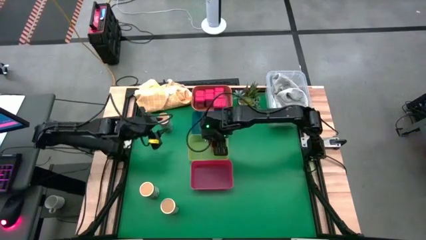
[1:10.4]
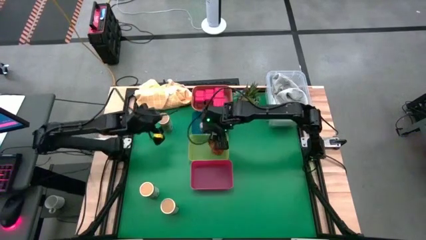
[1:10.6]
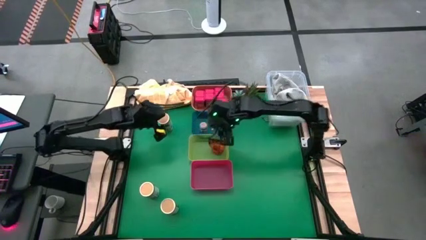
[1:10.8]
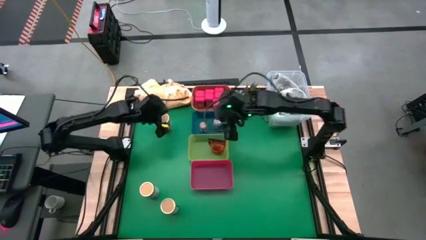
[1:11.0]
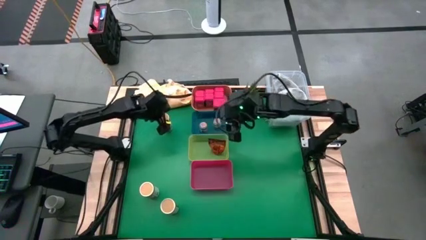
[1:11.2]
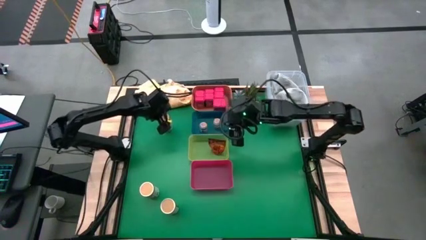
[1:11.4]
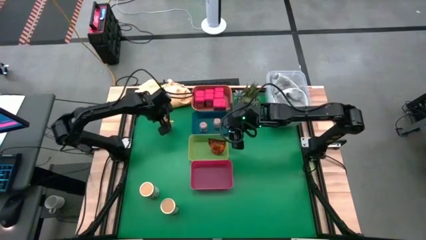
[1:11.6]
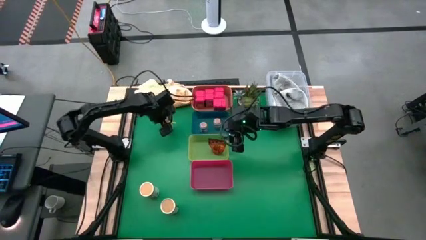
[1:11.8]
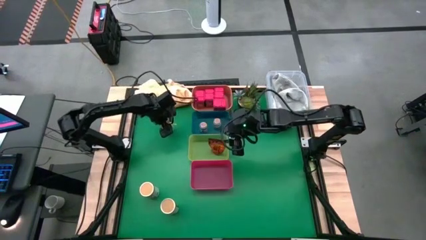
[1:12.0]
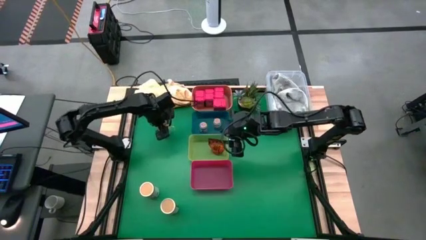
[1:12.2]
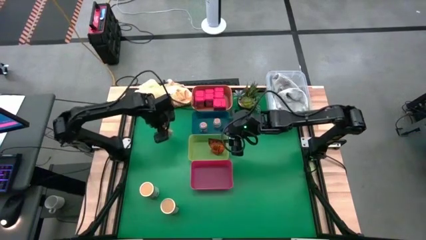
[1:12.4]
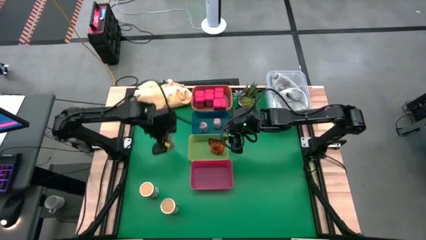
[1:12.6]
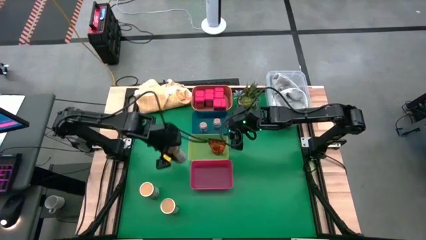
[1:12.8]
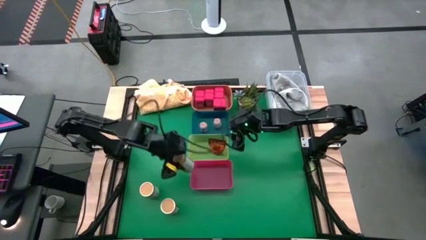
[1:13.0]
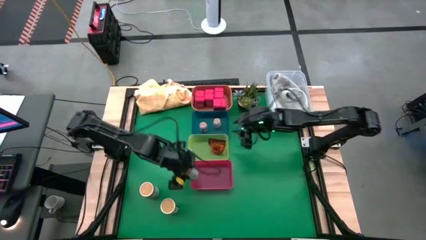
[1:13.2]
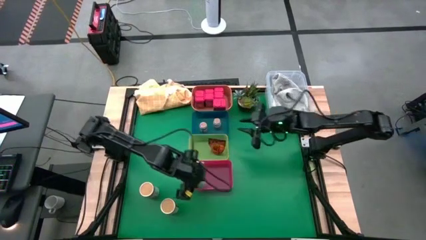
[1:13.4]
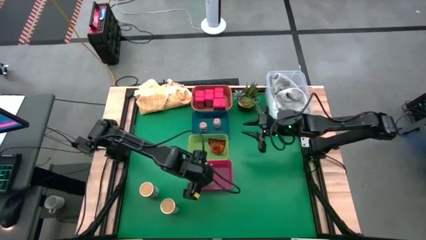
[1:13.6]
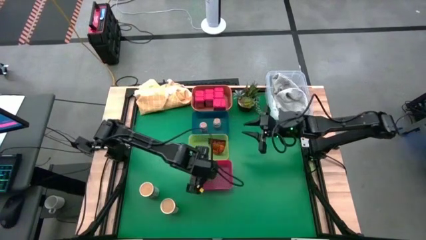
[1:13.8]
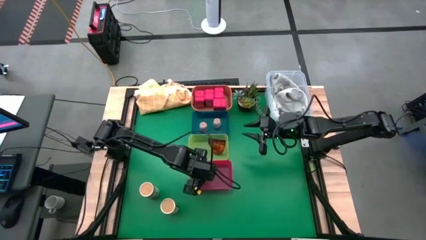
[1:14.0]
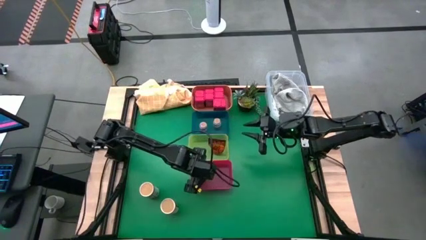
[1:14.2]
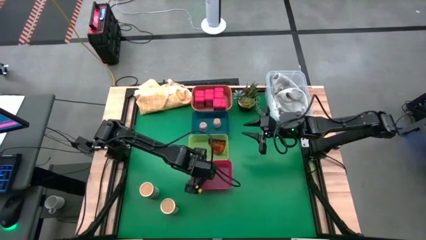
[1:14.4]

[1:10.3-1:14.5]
Task: Sort spices by type
Put the top gold seasoning bottle into the red bin

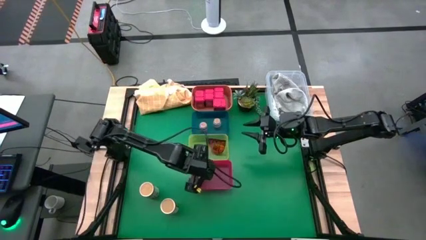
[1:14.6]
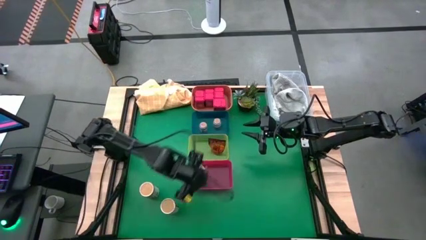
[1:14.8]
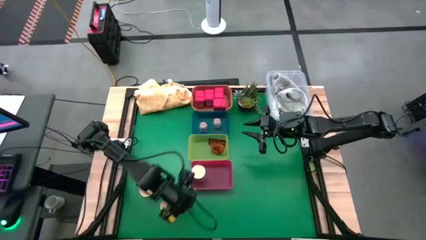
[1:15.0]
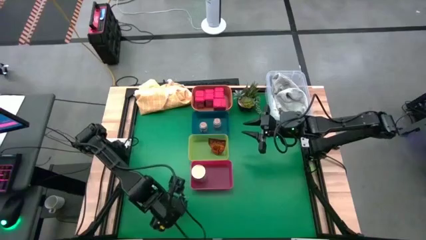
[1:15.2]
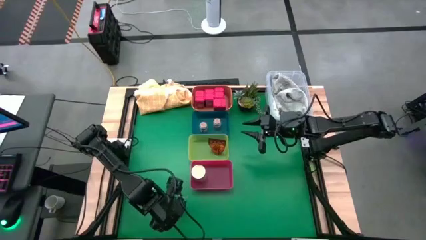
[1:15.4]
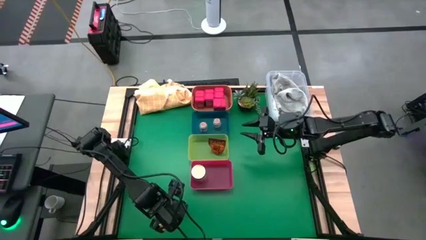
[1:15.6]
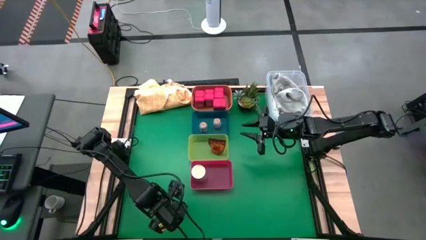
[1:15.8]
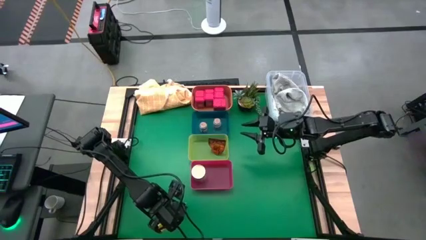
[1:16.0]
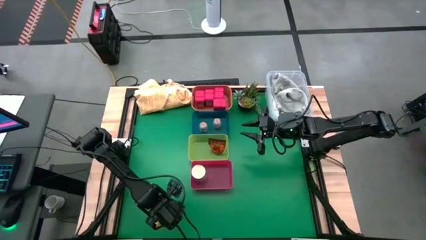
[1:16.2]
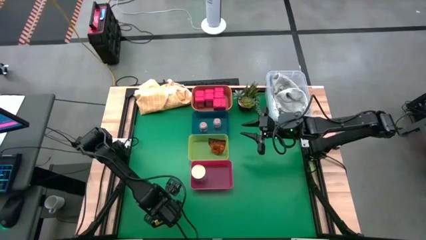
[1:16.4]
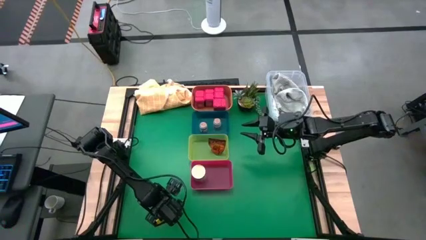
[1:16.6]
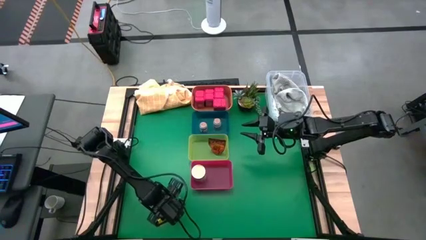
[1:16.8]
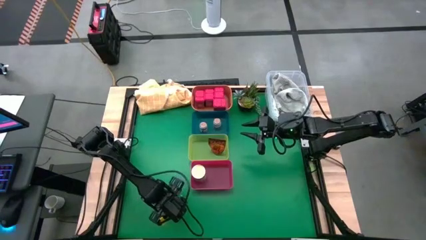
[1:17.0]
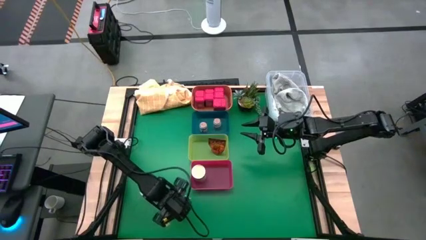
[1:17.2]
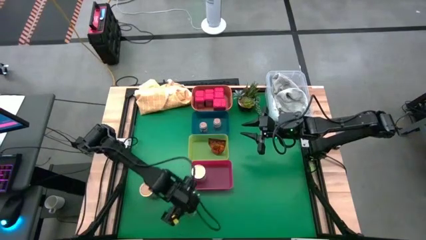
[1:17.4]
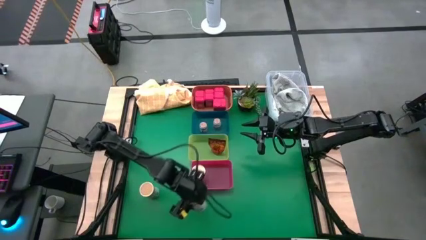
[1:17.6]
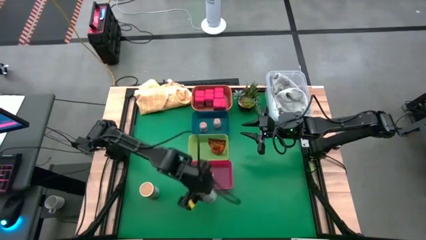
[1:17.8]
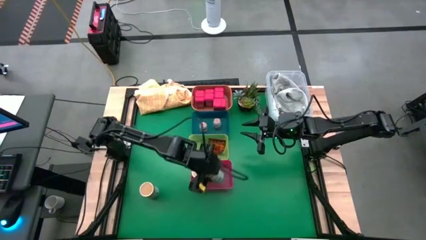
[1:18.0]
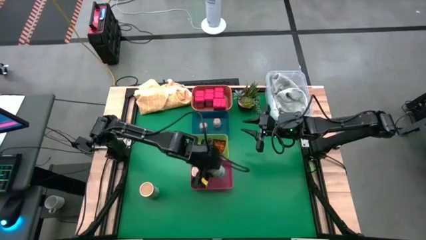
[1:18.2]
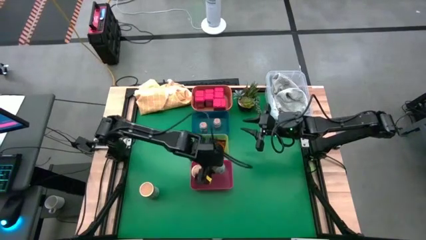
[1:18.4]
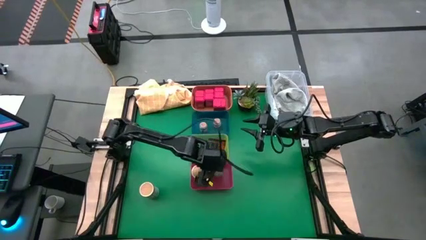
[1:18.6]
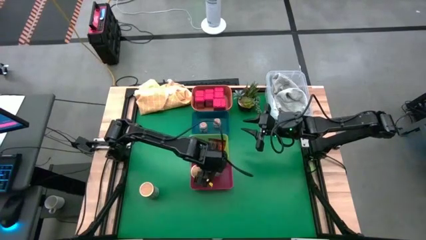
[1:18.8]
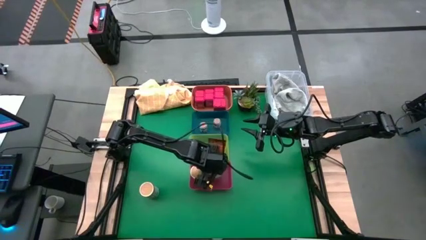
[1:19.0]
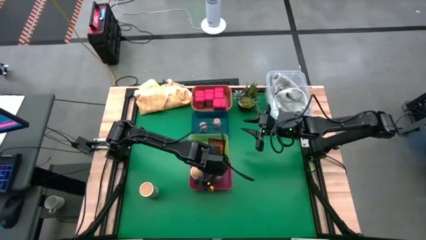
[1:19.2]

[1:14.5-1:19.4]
Put the bottom gold seasoning bottle into the red bin

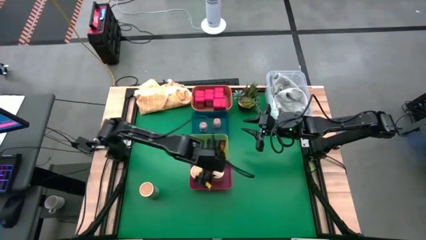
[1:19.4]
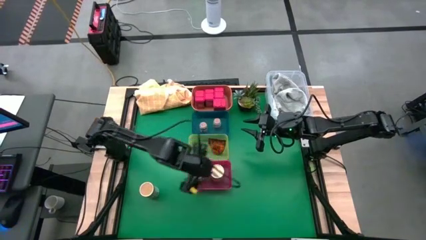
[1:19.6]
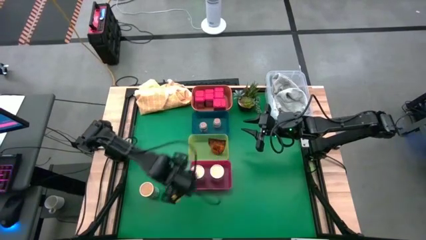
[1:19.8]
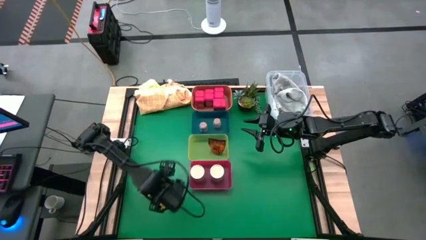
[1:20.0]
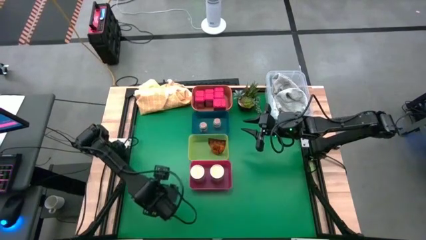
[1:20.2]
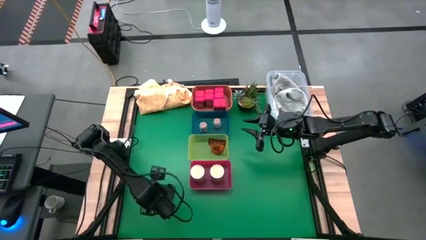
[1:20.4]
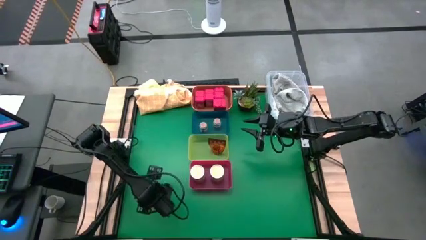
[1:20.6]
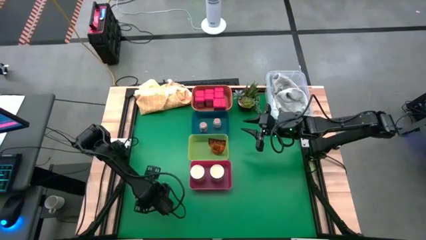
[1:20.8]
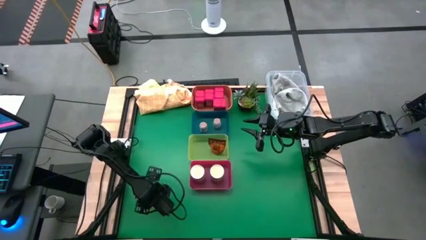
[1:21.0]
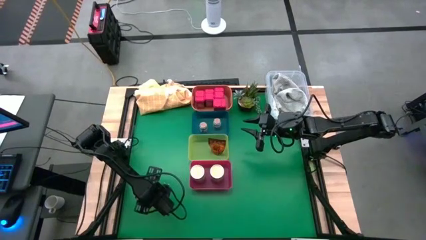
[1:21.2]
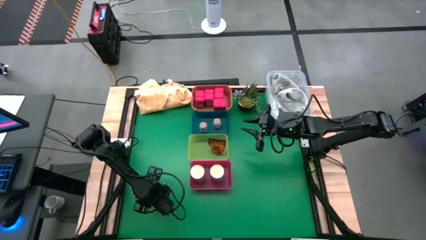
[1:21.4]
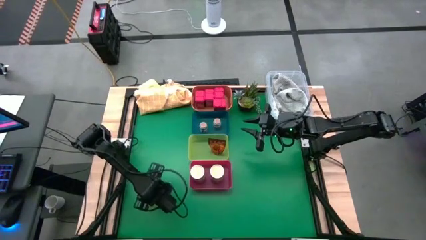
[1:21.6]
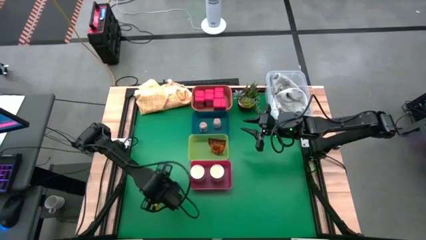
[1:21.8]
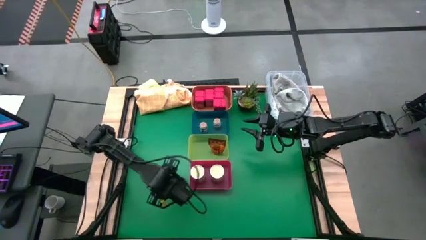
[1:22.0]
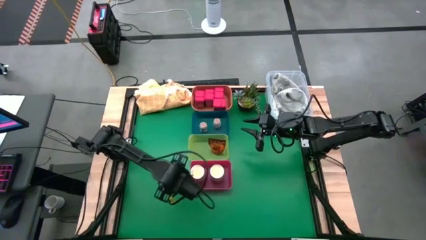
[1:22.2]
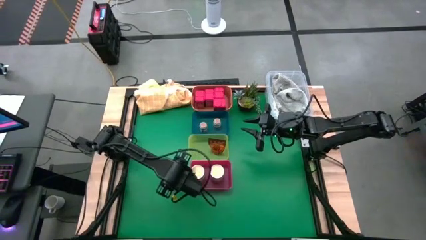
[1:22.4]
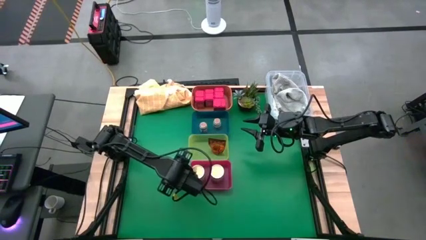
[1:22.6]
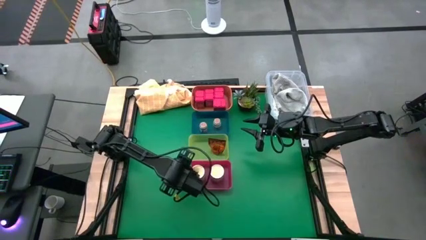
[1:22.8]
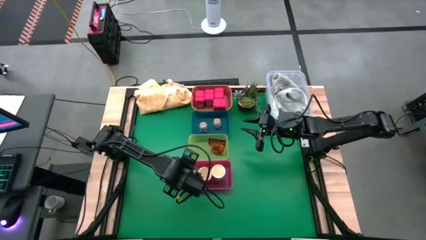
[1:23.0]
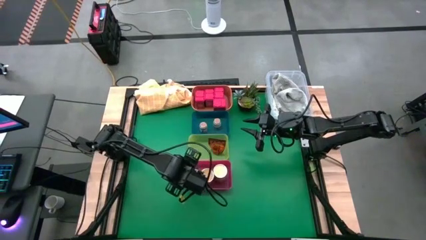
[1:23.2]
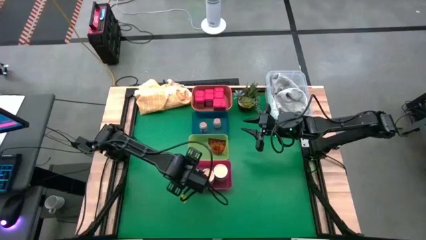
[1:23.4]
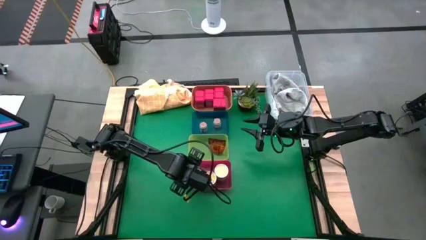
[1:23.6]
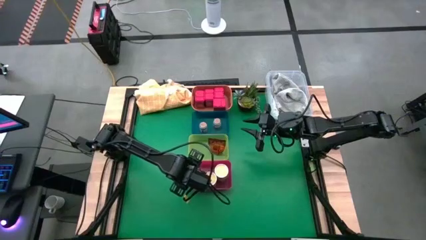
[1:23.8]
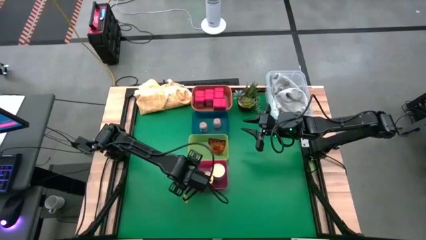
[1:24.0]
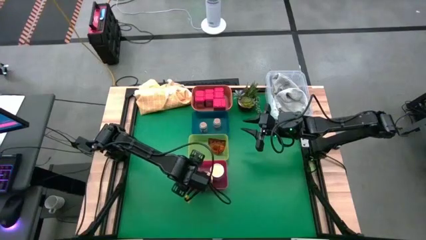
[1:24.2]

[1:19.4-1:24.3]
Put the gold seasoning bottle into the red bin
